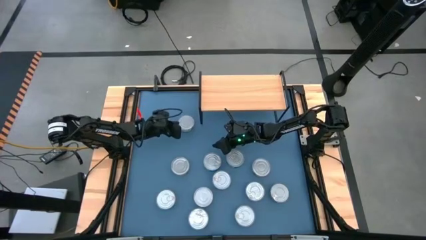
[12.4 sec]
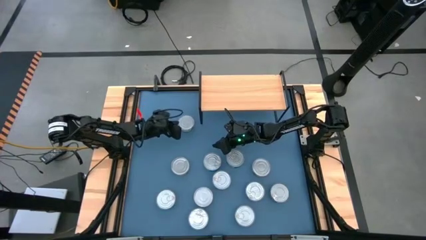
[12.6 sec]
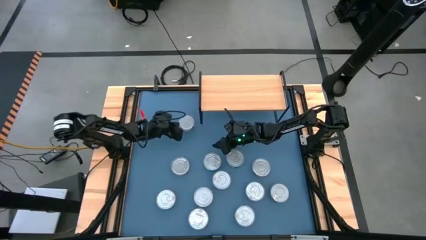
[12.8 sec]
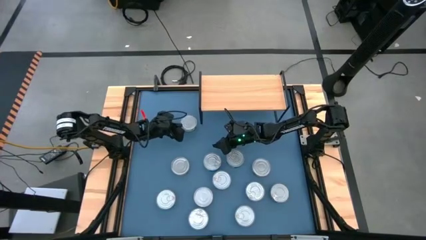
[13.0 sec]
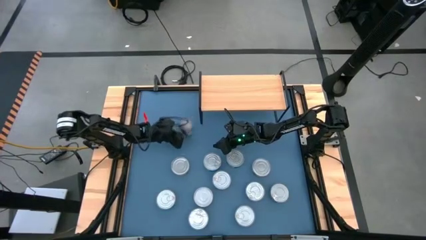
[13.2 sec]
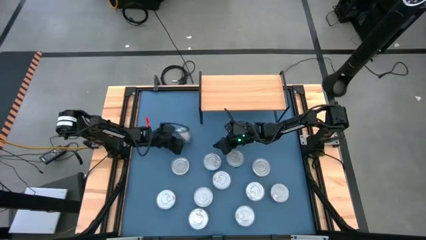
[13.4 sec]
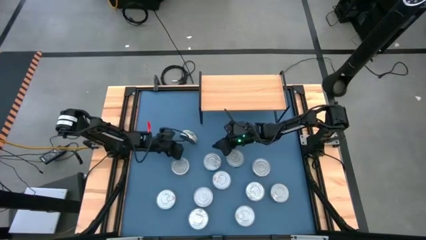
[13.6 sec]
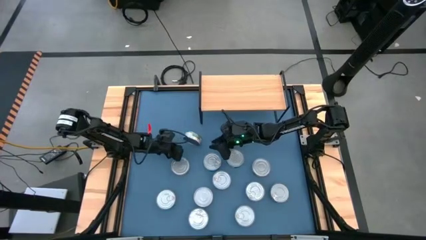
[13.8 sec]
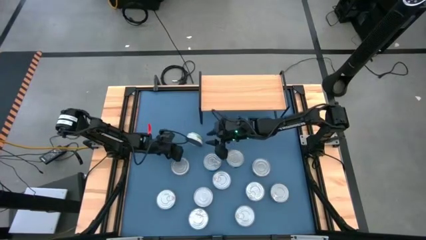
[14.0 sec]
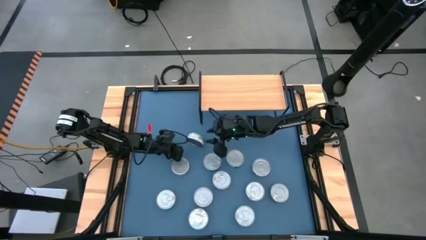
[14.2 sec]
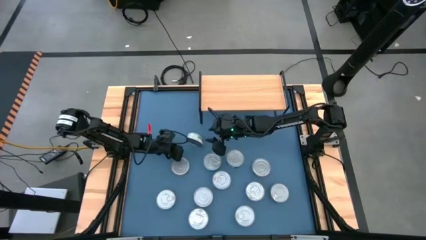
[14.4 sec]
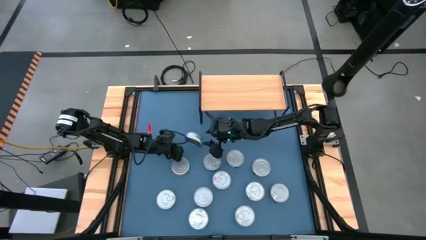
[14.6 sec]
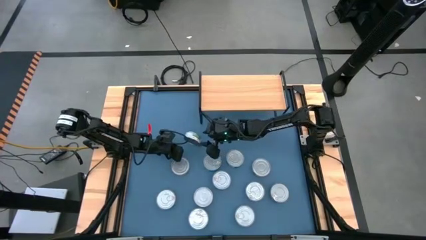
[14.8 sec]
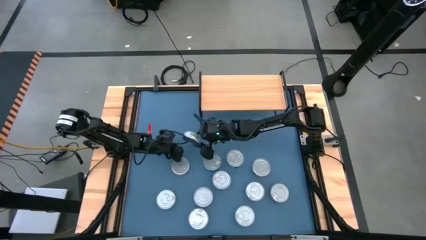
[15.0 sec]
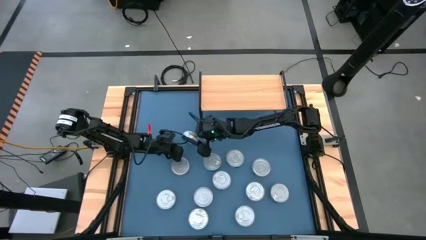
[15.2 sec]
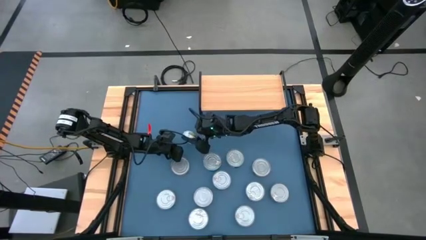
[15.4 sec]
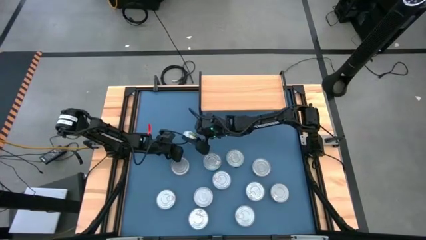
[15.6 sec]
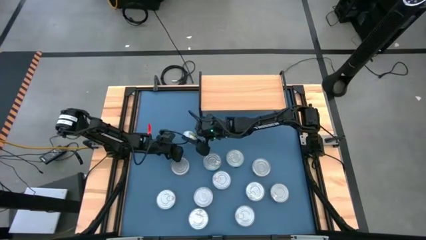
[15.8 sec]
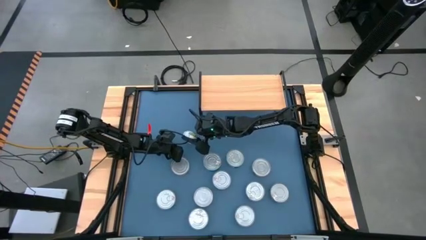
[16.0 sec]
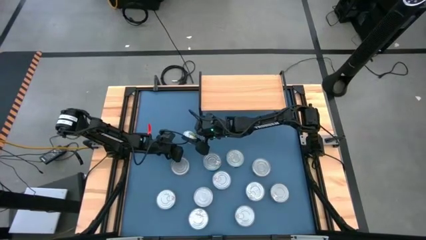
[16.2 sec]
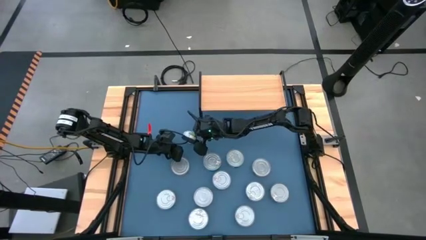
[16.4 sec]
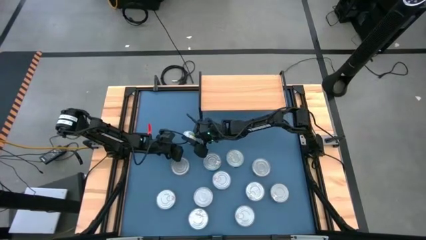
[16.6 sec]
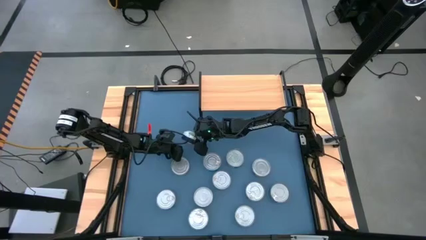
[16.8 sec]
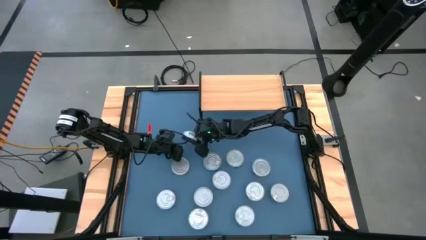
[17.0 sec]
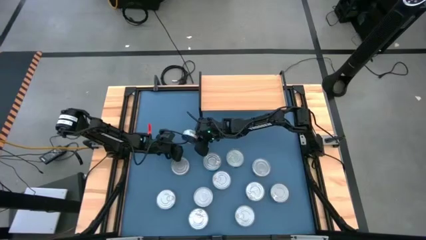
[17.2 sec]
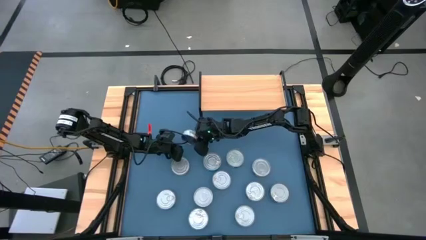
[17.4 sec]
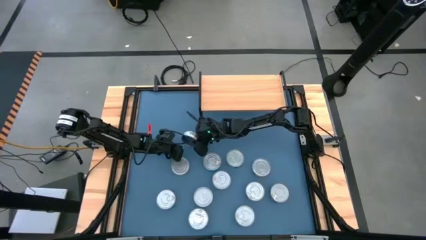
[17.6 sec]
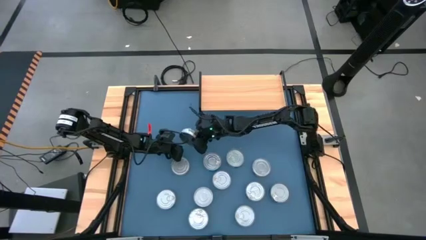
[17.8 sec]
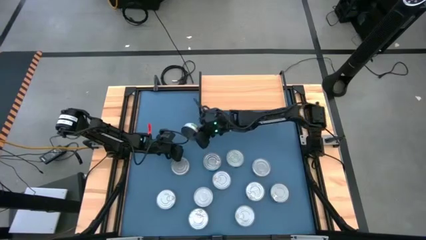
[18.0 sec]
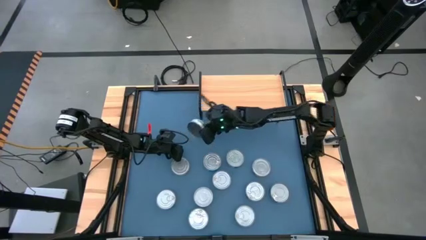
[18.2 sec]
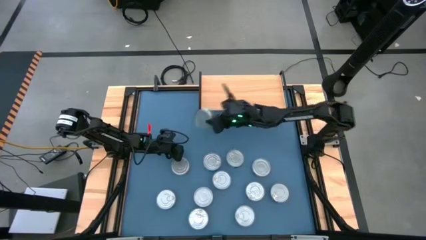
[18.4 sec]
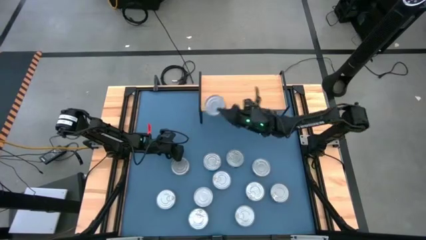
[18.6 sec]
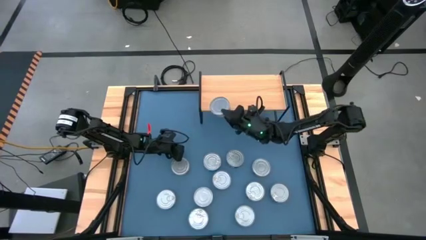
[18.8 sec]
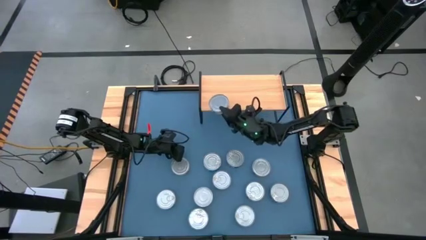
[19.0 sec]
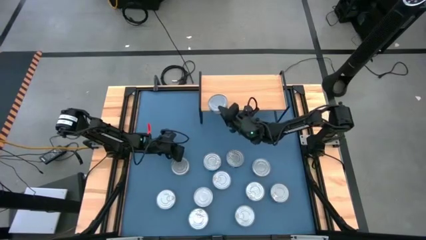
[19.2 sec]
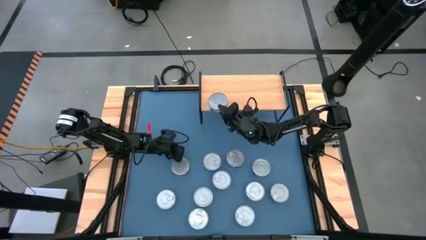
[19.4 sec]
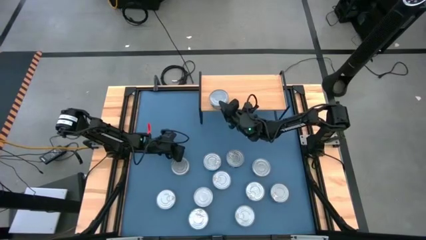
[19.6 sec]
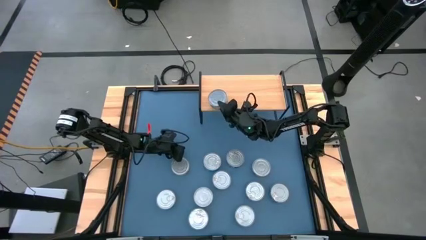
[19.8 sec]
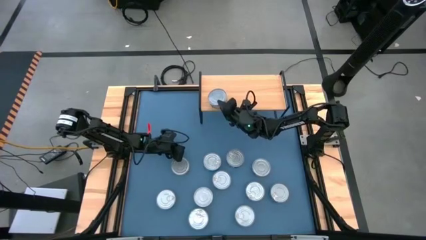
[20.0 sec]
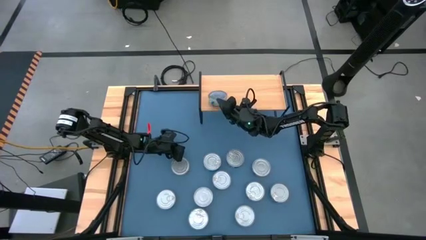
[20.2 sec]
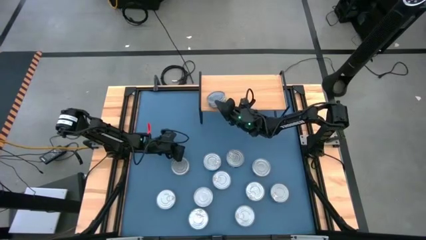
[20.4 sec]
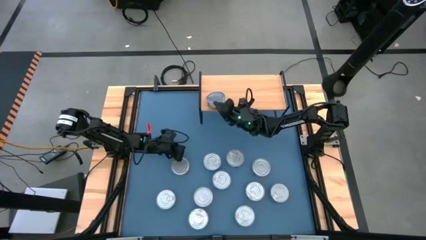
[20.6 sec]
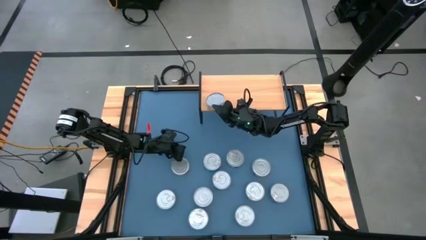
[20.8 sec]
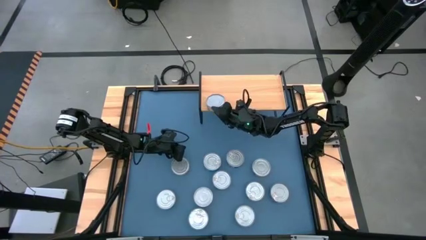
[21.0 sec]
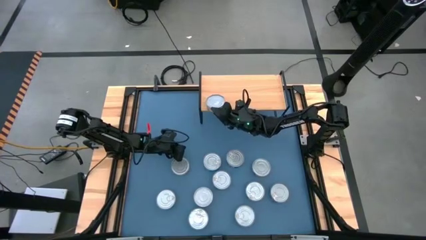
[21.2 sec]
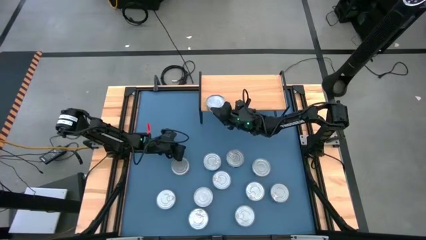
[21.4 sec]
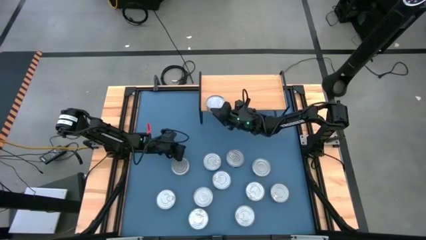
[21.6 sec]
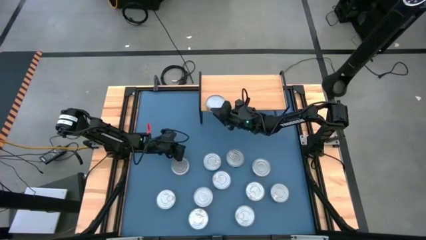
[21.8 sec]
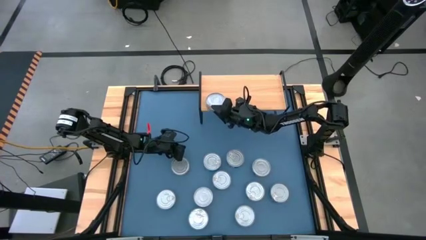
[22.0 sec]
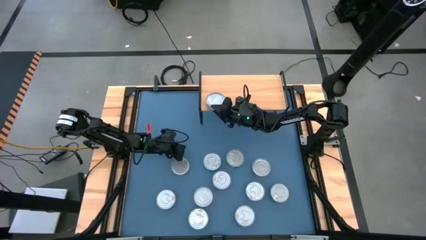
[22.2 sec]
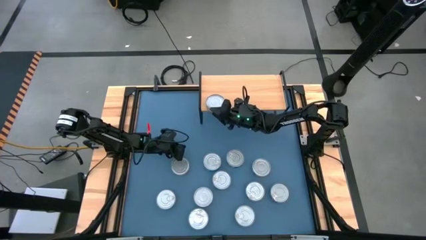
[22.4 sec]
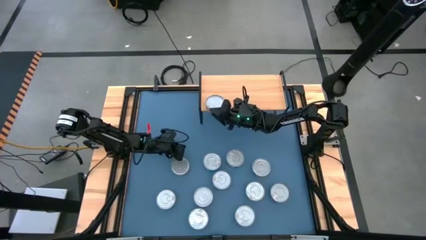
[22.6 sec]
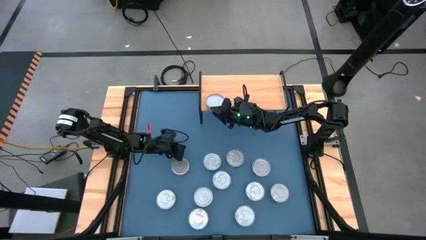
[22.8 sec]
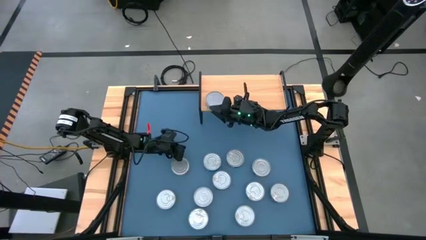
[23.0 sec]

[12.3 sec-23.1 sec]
Task: Stack canned seafood by type on shelf
Put the green tuna on the shelf

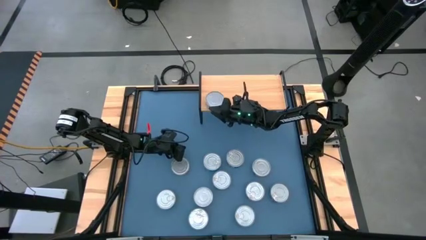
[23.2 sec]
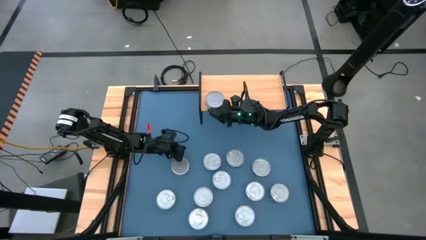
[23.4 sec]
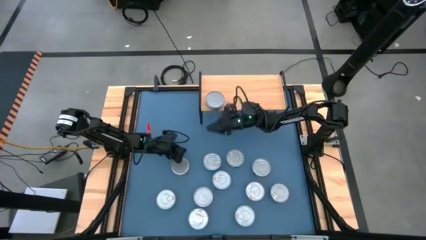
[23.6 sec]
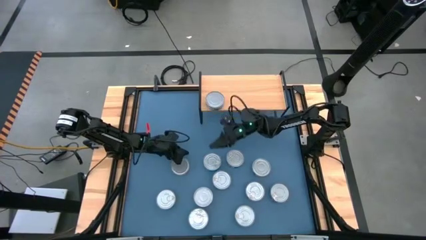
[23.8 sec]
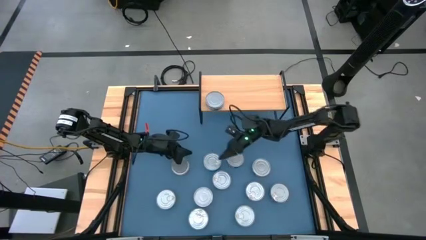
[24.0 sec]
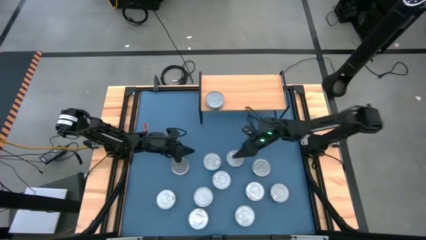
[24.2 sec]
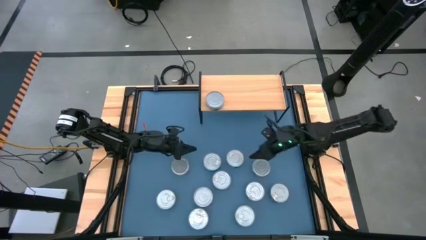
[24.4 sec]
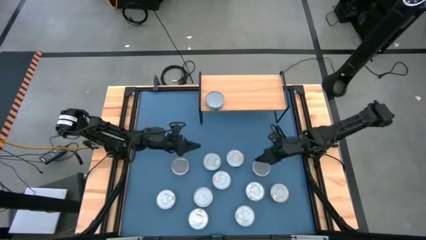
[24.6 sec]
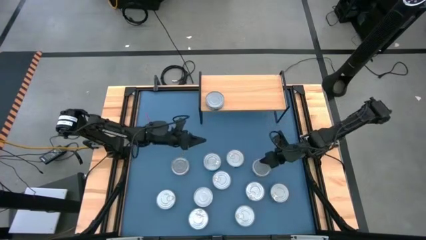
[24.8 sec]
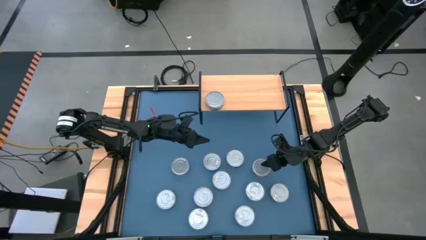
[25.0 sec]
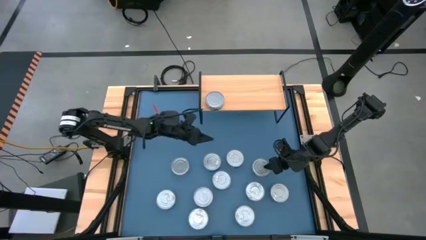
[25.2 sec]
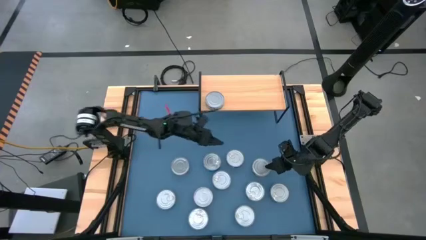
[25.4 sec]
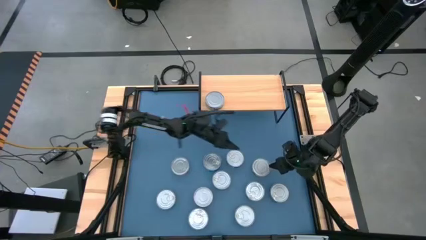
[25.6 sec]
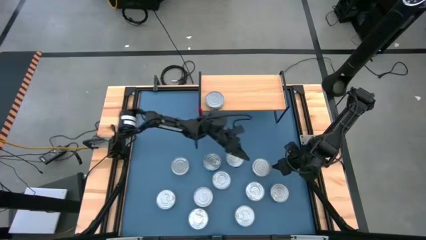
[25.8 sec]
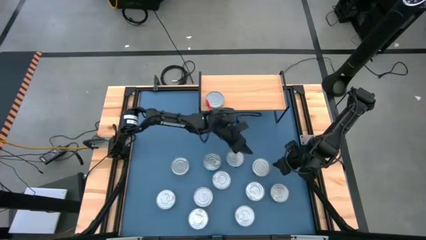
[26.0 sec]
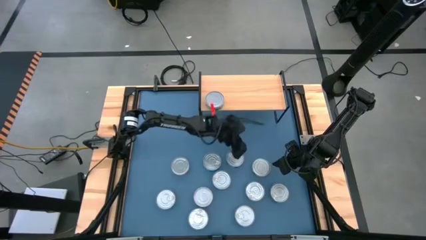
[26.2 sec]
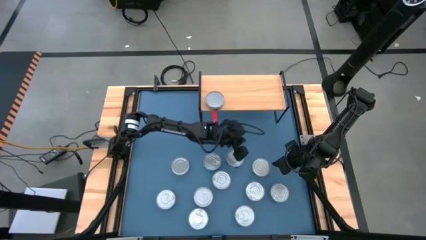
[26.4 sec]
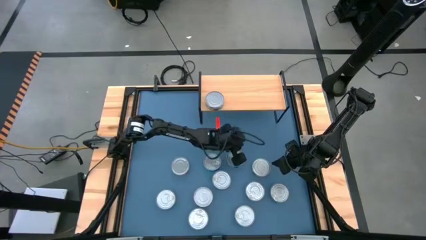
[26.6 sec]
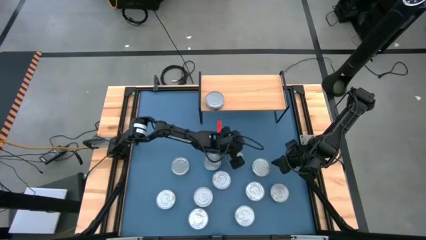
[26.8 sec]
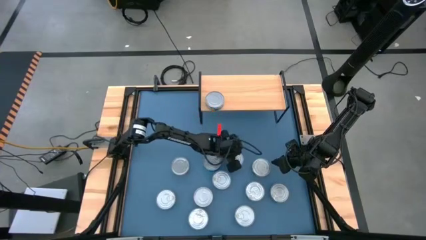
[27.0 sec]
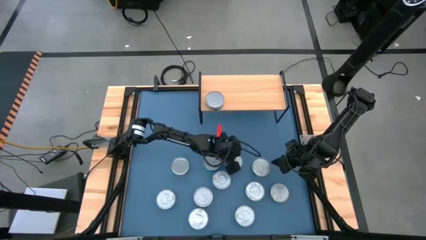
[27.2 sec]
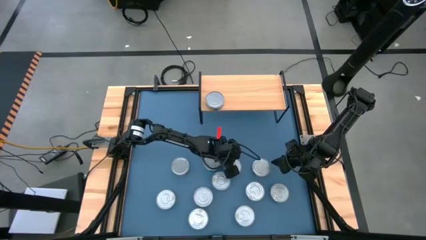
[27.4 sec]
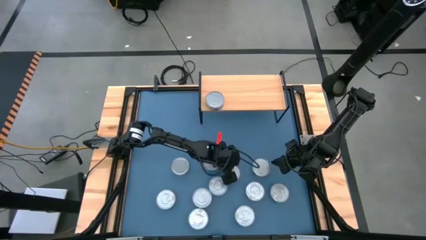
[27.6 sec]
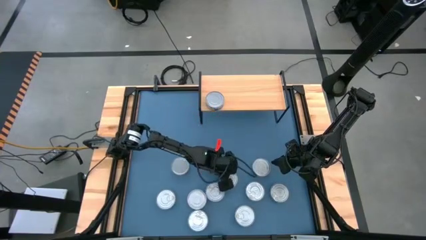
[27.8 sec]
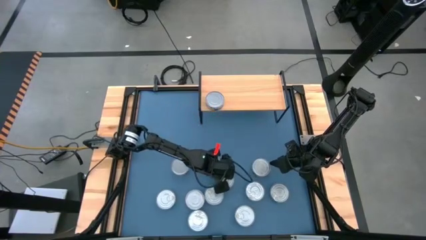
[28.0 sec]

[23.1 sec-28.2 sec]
Adjust the blue tuna can on the table

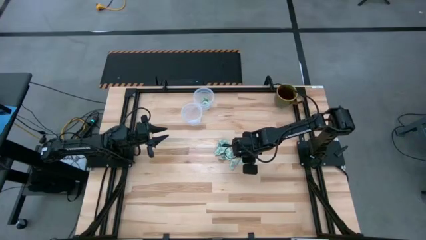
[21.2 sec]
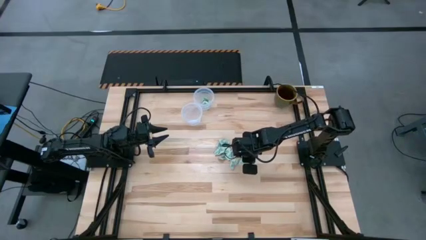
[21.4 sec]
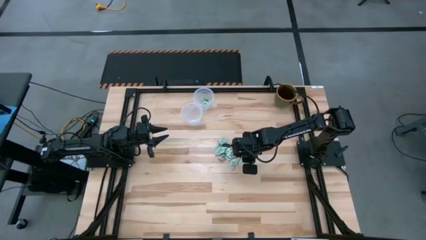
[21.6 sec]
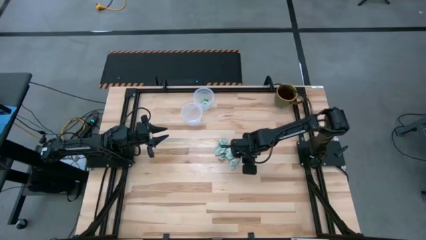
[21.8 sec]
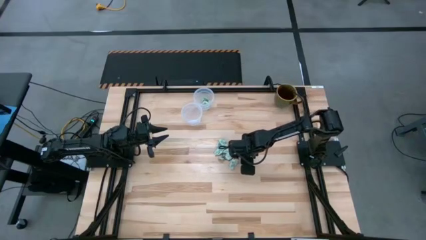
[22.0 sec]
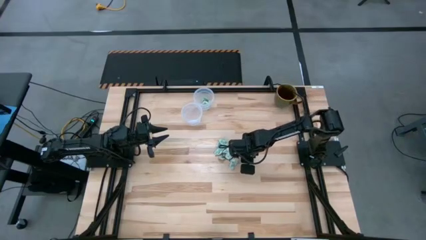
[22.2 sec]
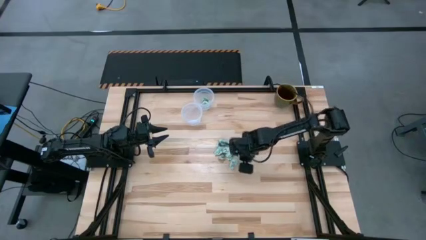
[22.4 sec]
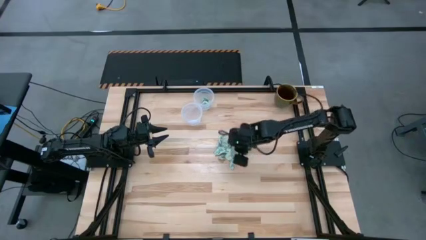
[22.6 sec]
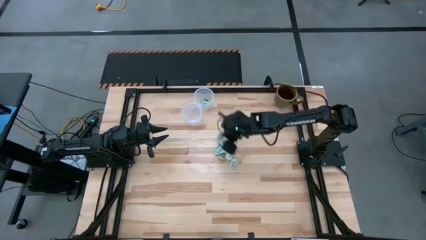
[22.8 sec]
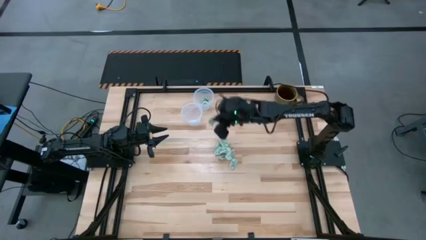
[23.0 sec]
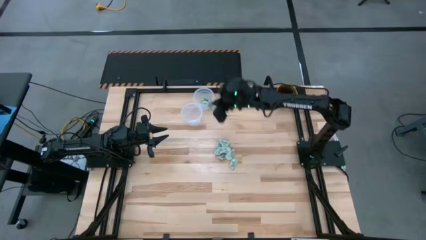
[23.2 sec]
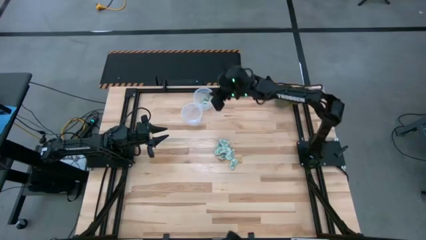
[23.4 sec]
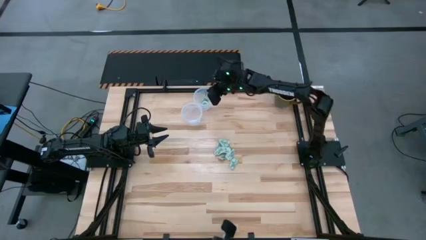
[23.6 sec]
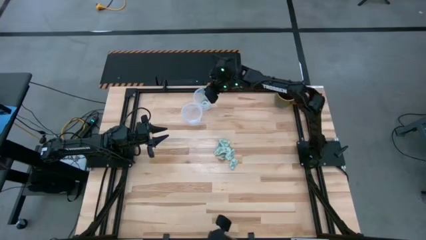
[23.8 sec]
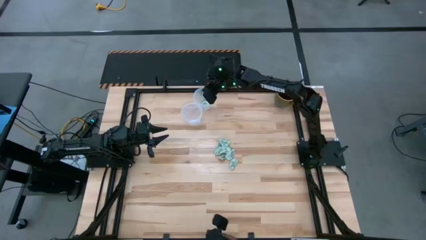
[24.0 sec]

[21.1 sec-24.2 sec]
Task: Pick and place items into bin
Put the stevia packet into the top bin
